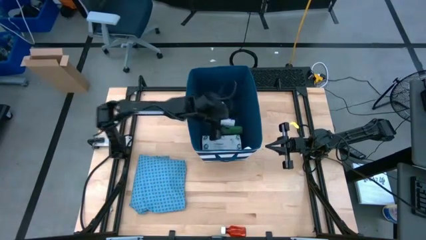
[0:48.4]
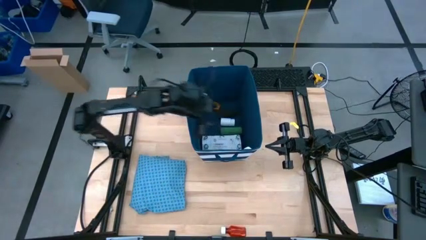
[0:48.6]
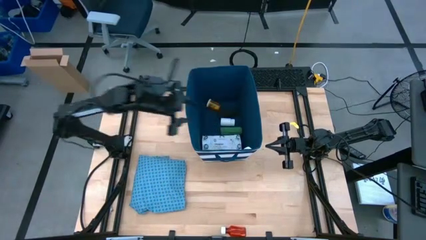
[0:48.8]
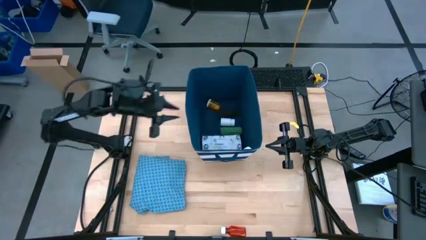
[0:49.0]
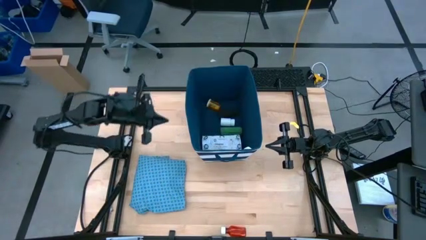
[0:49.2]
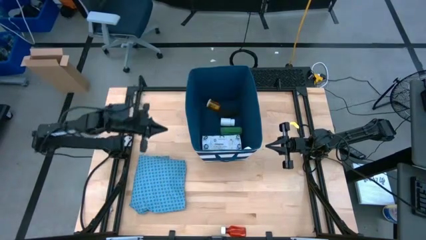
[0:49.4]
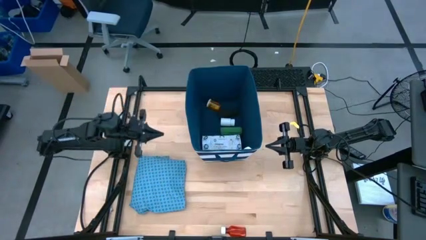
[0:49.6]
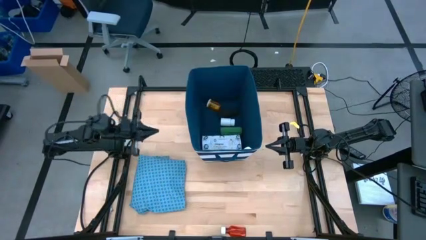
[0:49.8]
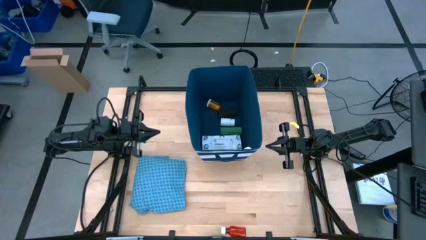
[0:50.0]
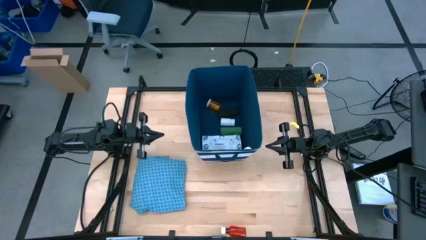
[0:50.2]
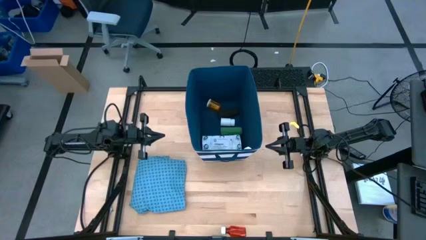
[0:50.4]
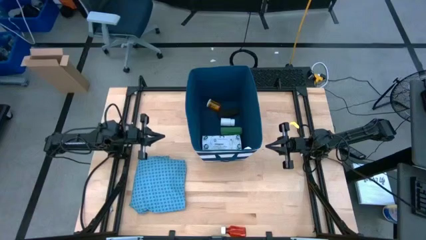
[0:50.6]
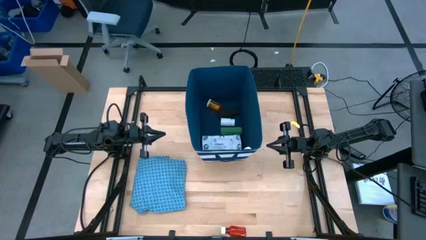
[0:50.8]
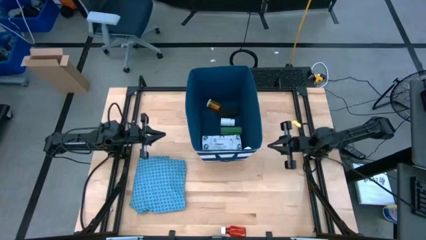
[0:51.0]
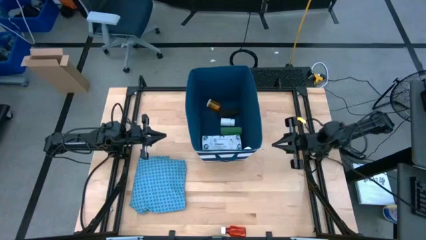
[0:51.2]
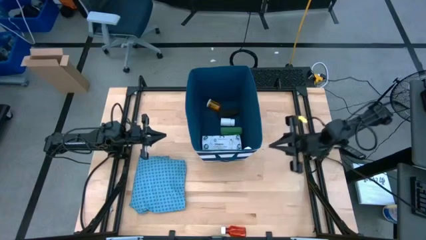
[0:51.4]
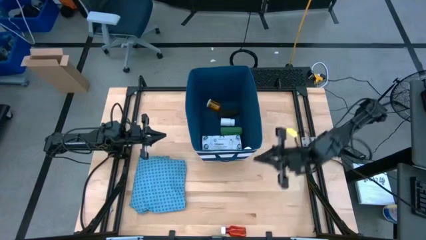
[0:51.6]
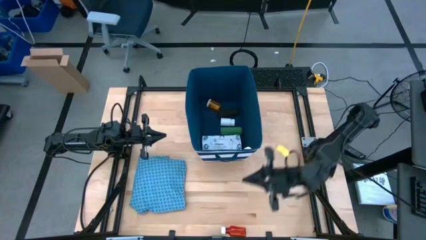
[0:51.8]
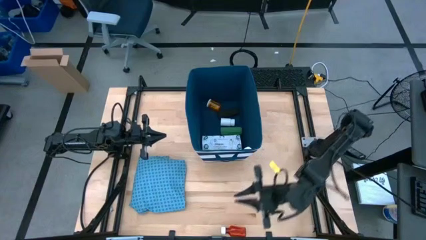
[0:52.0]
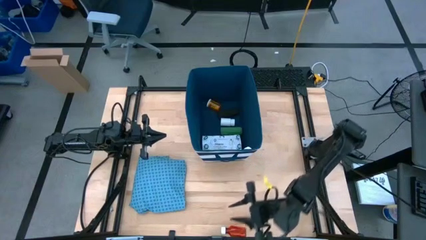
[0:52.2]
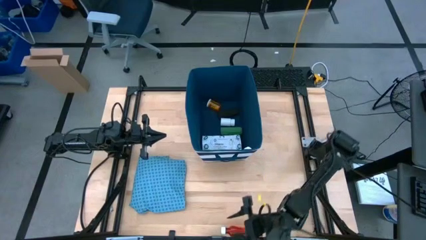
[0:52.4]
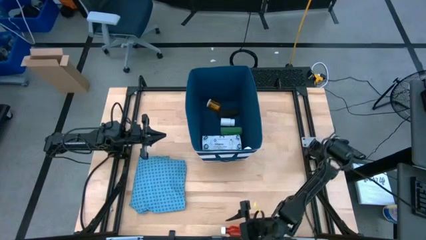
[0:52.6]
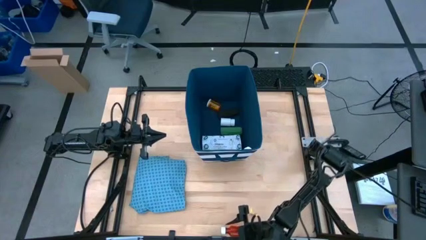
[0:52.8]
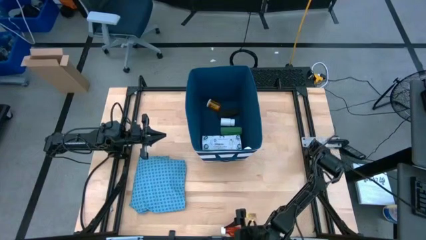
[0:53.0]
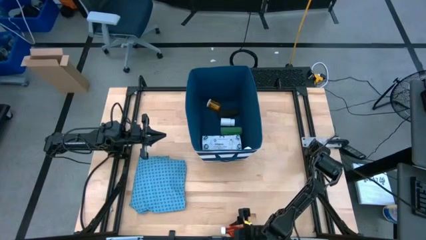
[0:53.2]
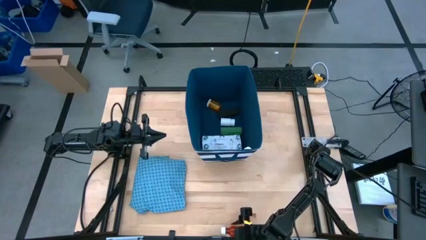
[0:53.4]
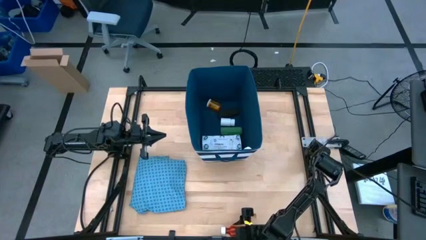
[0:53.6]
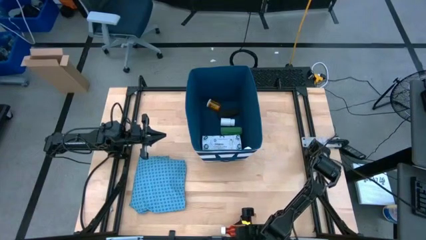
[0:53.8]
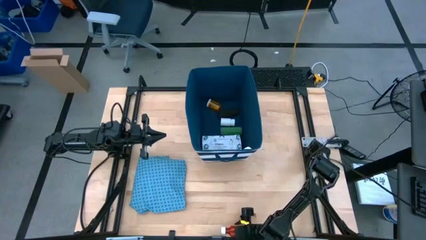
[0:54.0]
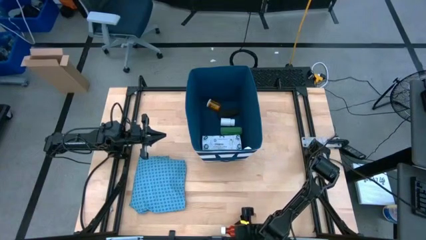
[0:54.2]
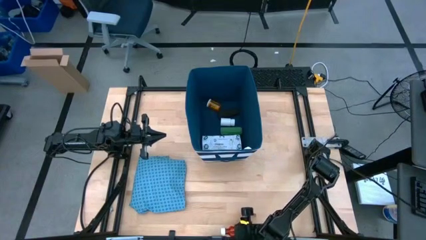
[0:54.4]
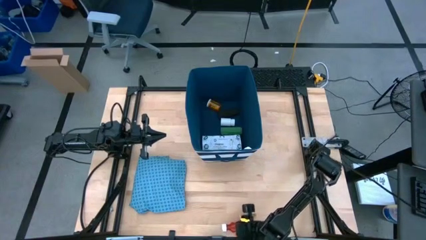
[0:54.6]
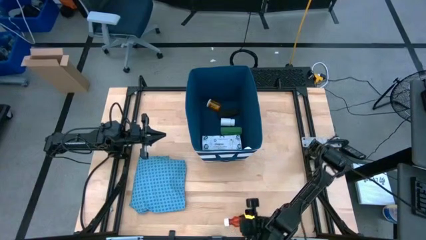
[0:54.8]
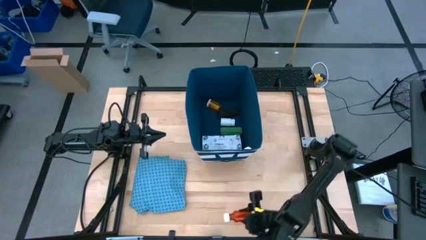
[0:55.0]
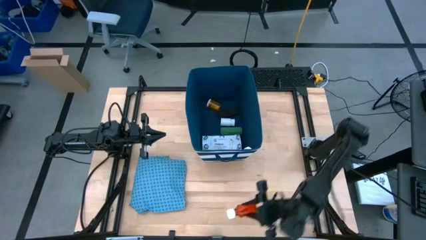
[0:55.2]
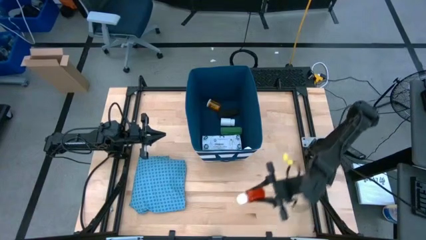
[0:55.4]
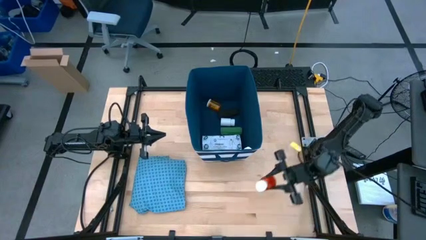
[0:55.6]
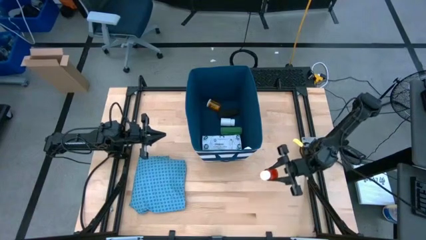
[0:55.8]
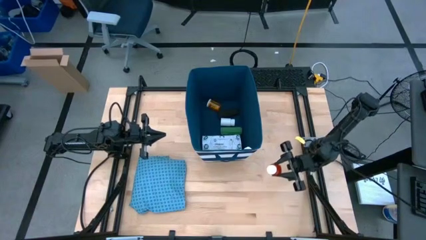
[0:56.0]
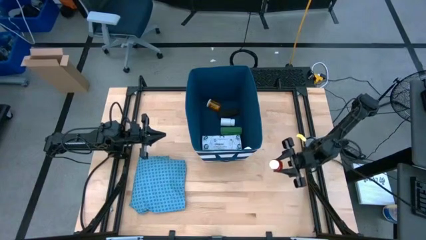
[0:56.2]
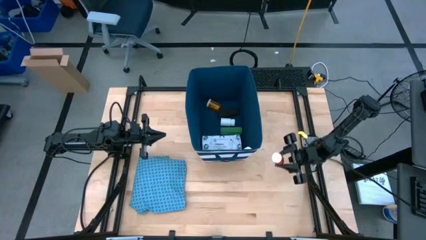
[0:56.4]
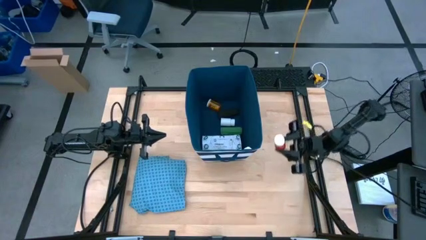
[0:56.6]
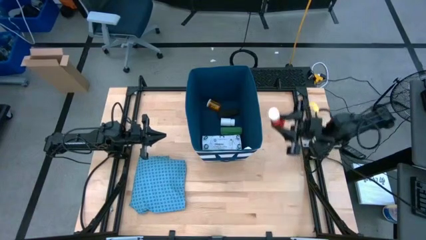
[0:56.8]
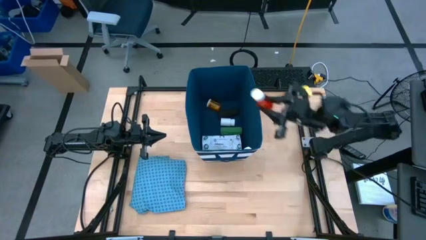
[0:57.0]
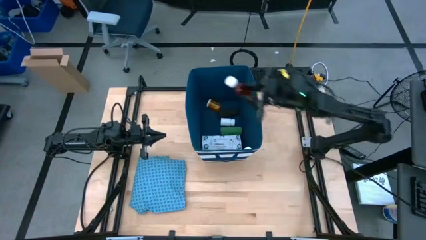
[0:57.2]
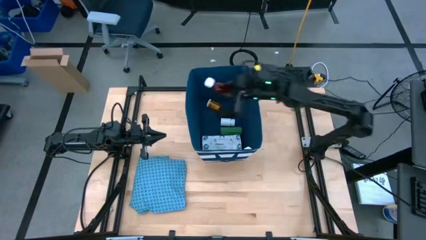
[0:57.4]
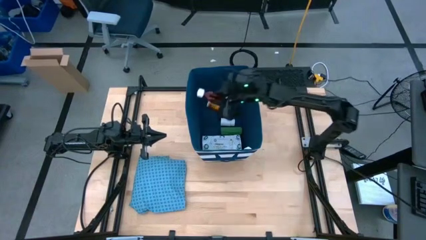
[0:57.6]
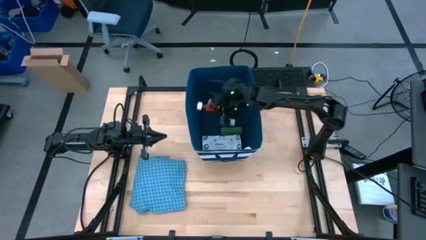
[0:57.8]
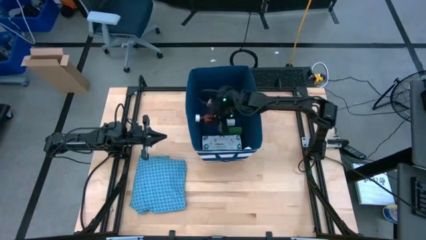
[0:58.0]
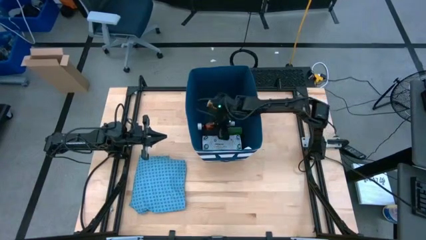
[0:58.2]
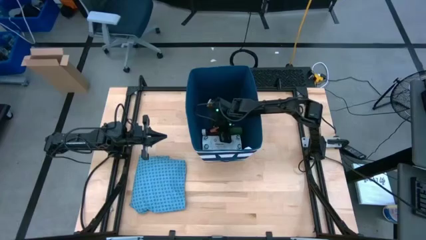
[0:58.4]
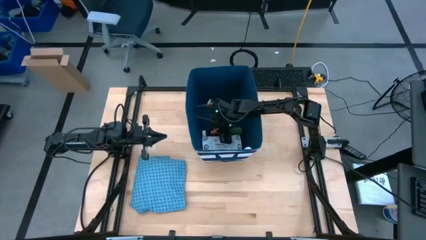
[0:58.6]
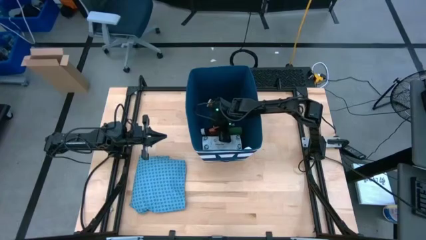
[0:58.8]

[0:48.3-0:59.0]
Task: Pick & place medical supplies in basket/bin
Put the orange pill bottle into the blue bin

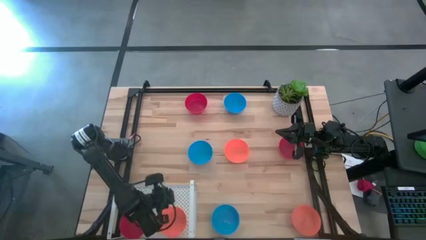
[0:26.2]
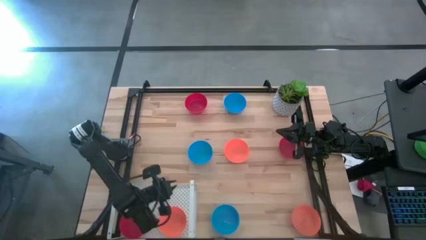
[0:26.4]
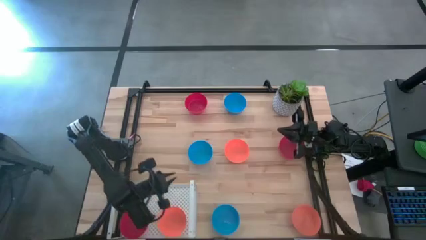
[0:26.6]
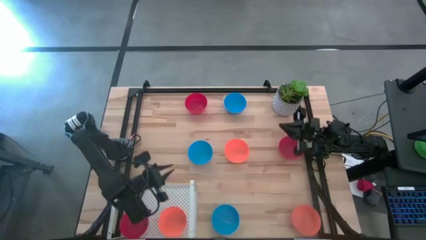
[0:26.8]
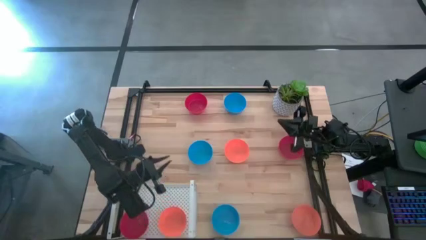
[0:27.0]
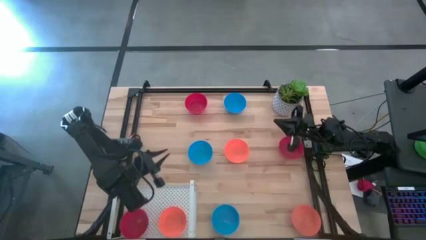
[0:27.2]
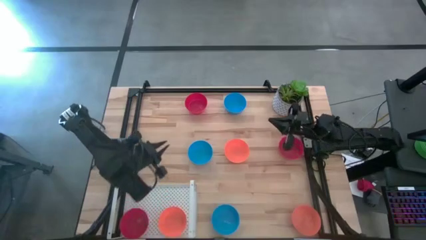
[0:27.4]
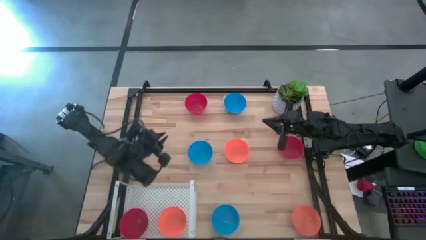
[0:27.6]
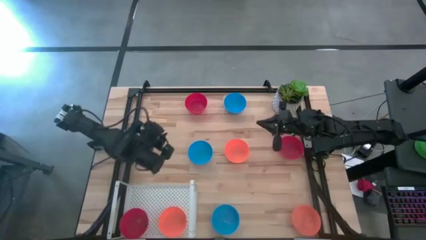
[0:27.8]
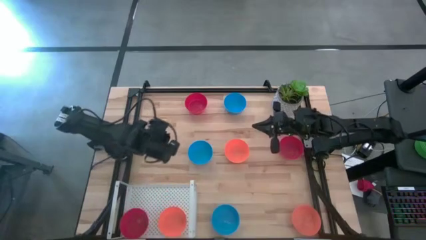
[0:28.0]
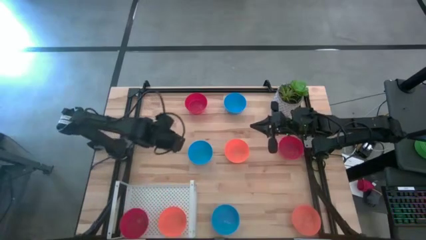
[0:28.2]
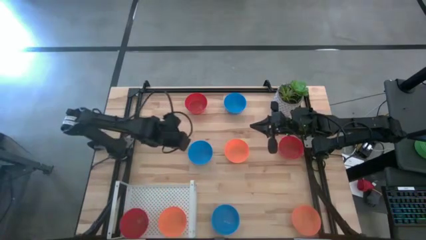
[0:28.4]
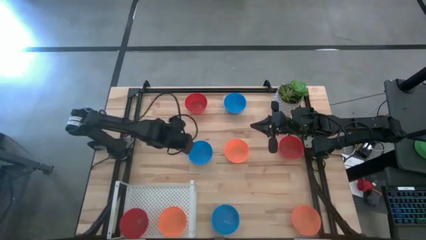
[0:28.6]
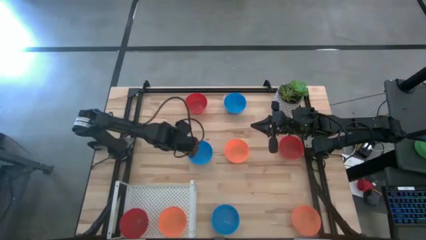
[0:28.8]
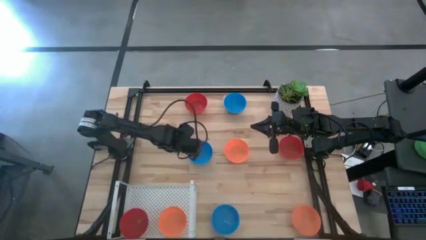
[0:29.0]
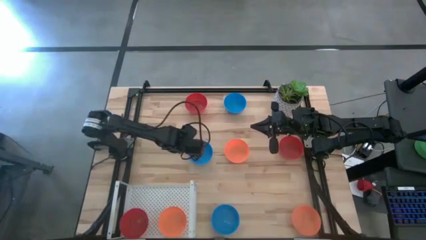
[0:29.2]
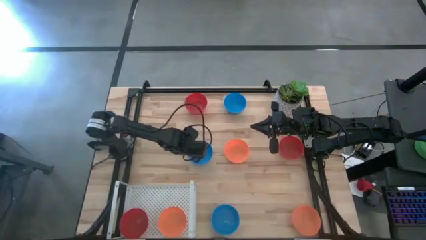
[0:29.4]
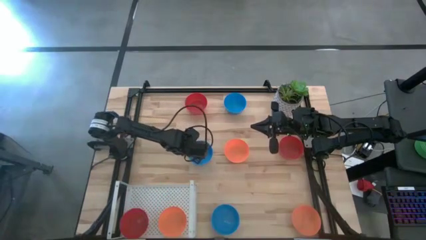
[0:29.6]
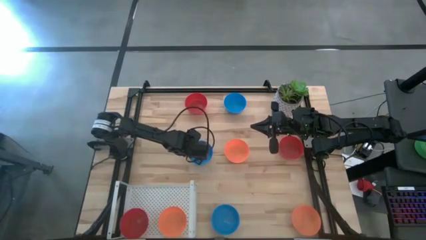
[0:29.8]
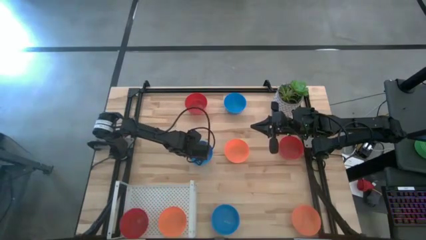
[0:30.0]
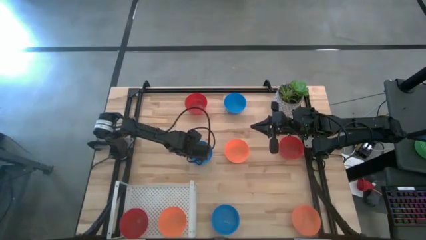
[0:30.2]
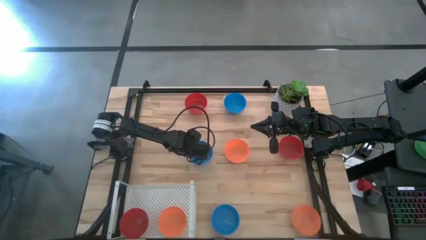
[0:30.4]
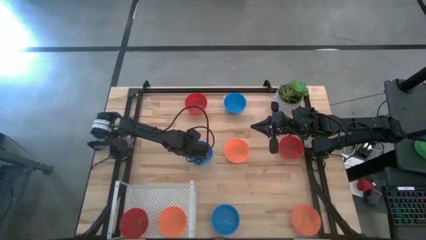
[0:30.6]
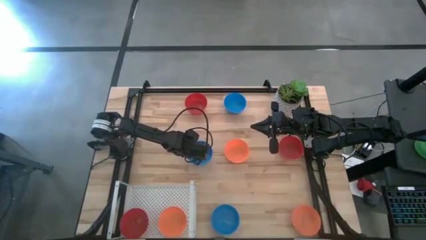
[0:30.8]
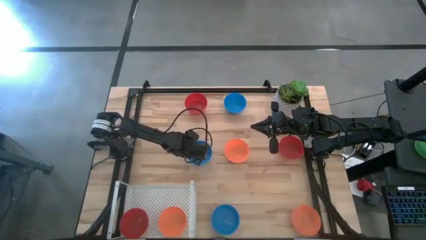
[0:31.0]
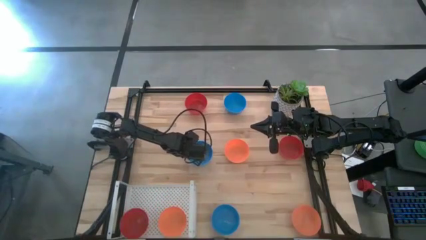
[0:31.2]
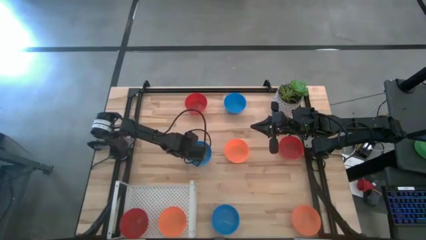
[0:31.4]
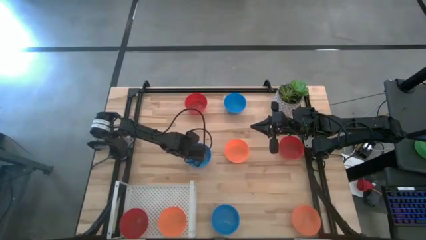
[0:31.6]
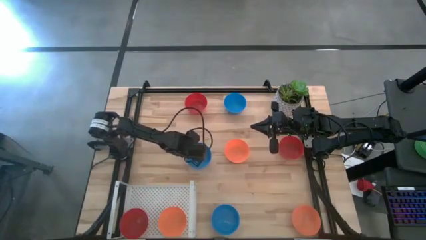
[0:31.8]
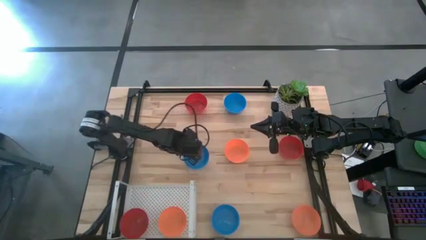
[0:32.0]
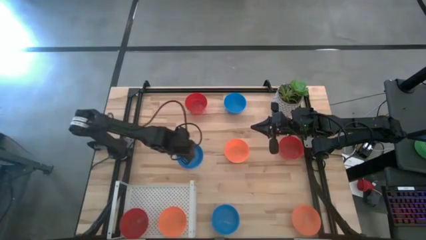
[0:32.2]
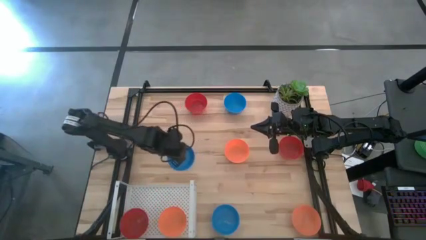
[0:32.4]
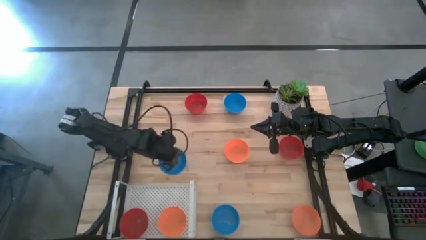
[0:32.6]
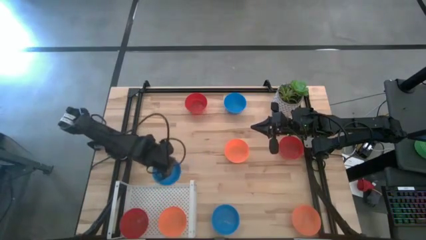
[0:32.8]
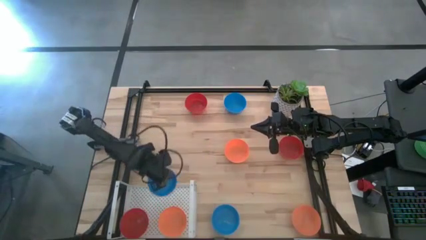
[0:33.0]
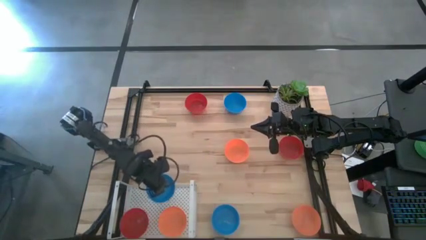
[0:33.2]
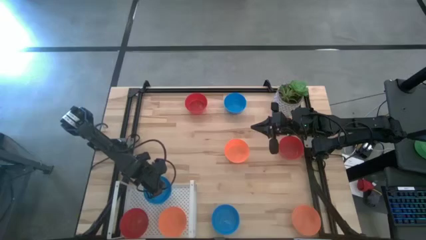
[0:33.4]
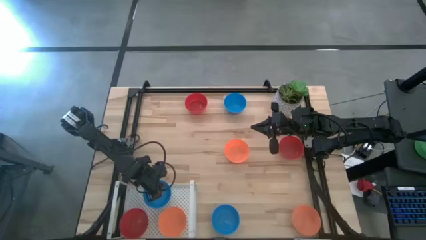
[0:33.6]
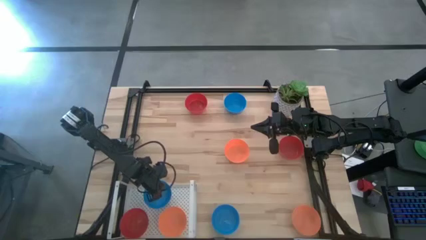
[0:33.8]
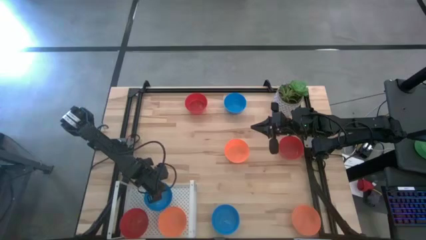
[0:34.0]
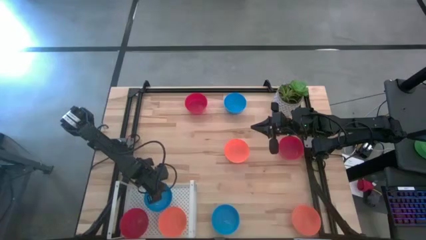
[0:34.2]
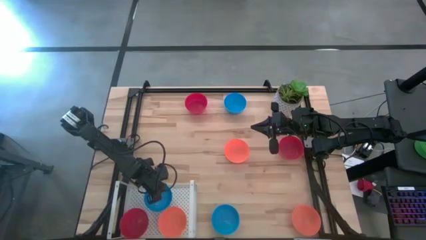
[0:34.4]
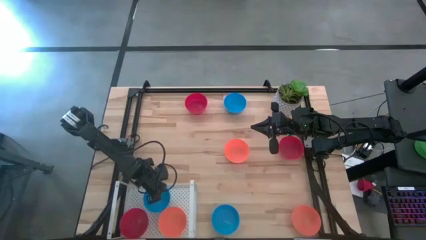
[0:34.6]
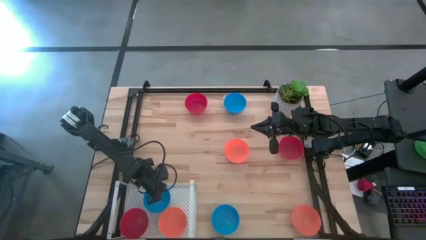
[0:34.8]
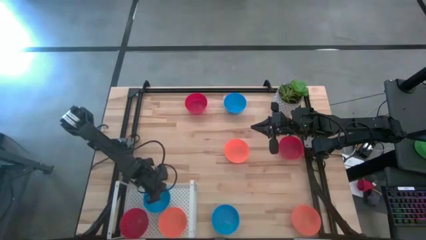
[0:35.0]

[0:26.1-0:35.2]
Task: Pick & Place Mini bowls
Put the middle blue bowl on the shelf
